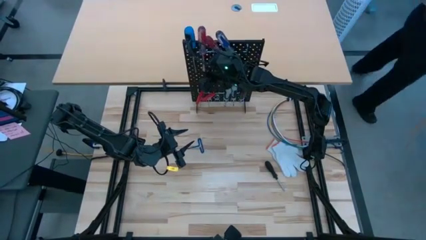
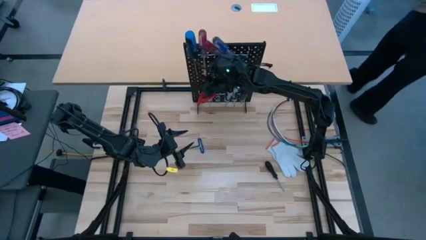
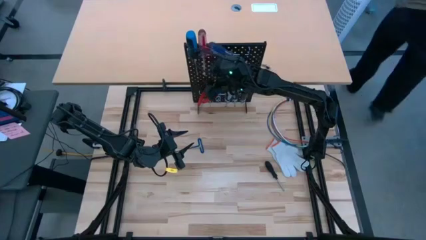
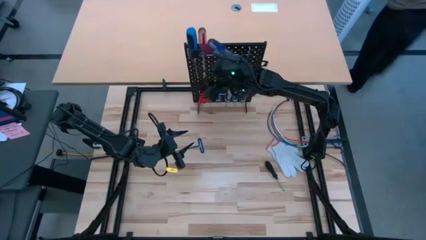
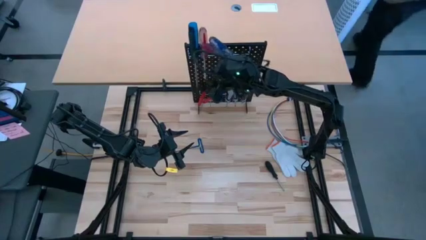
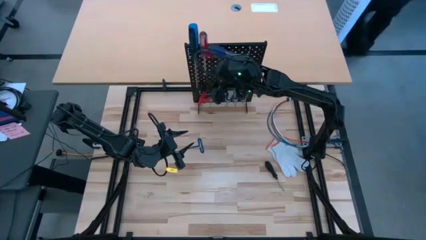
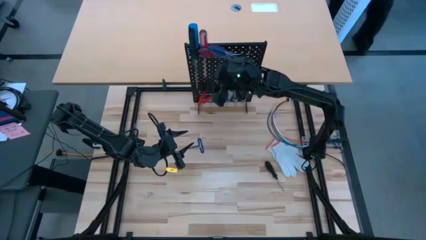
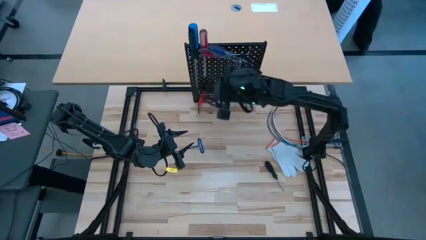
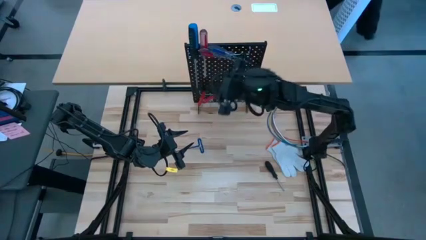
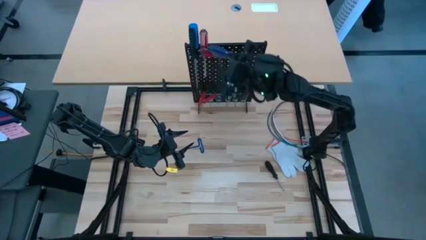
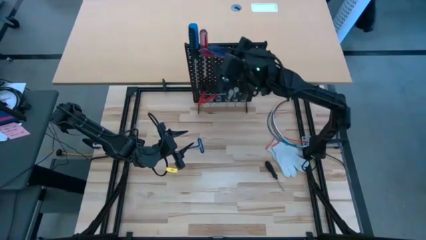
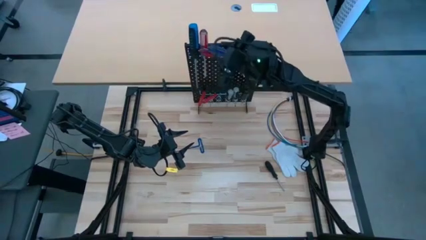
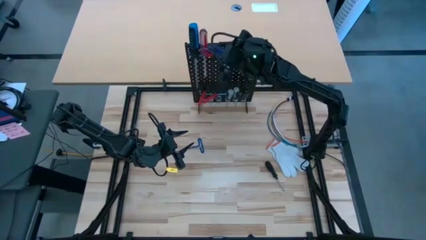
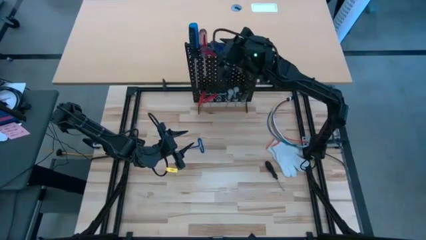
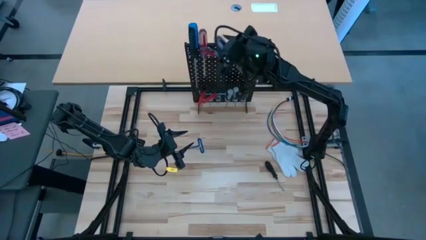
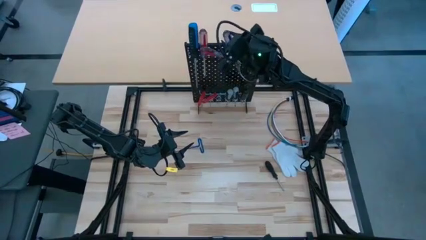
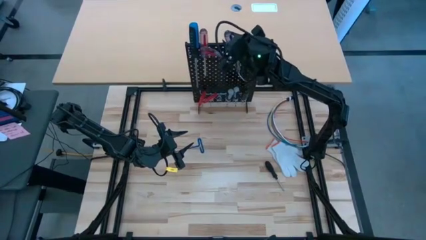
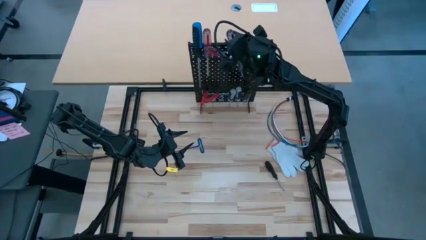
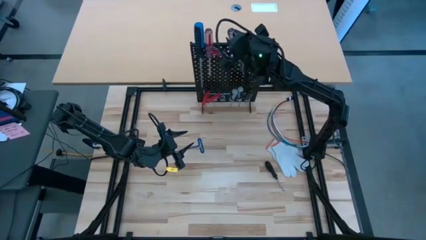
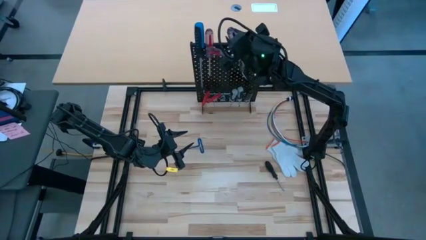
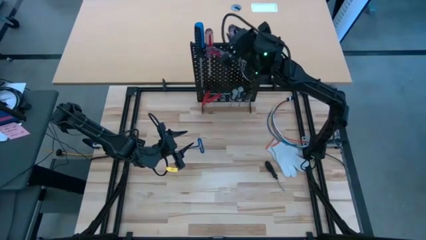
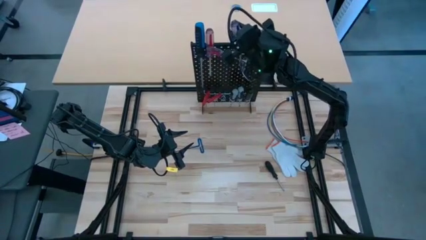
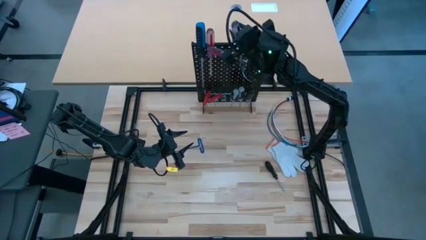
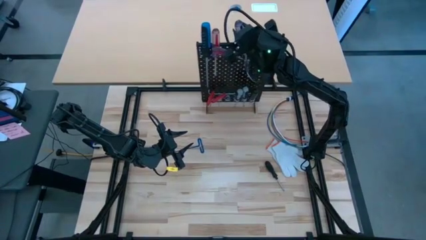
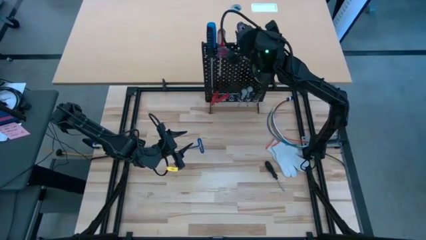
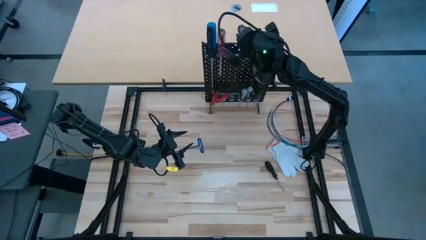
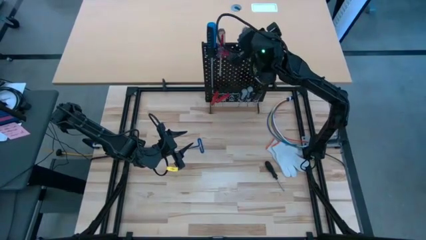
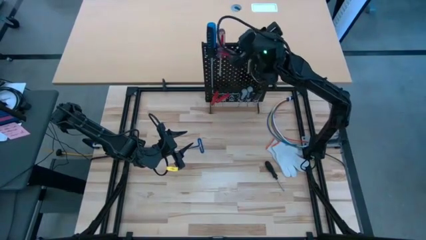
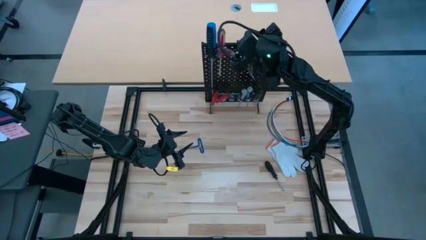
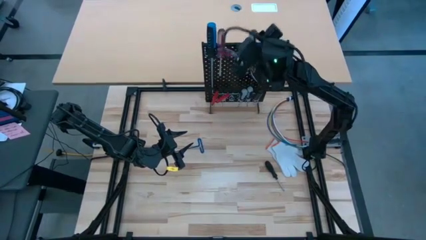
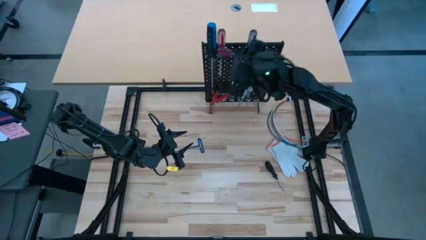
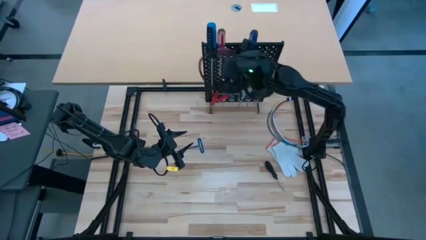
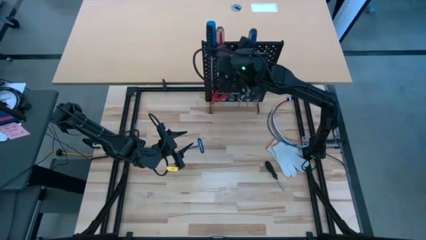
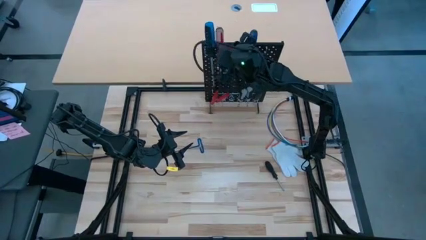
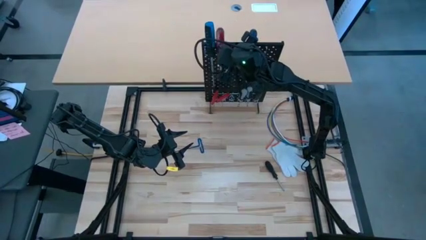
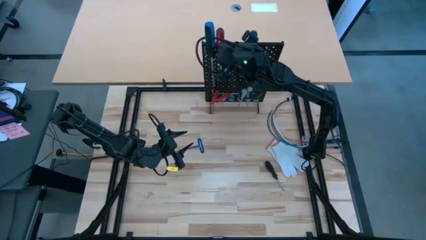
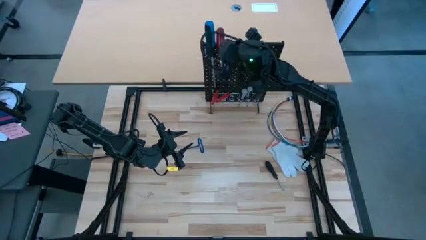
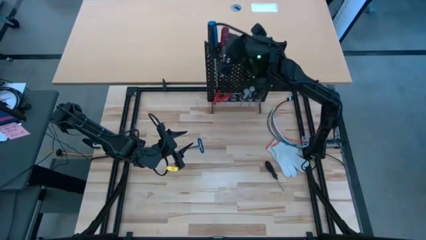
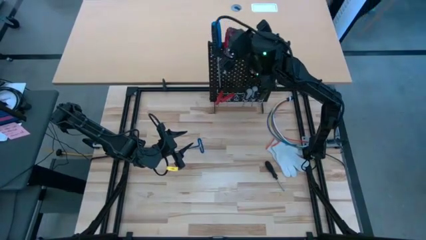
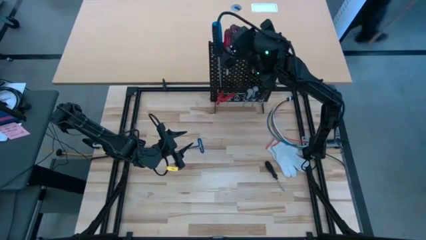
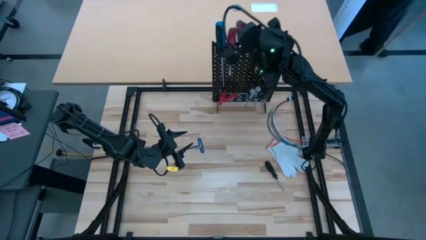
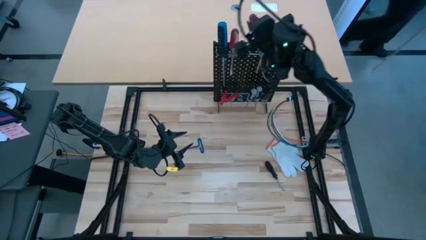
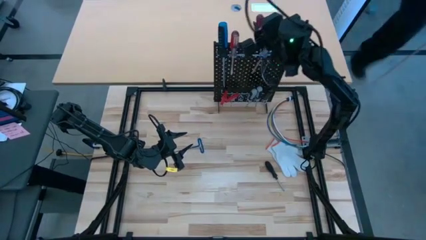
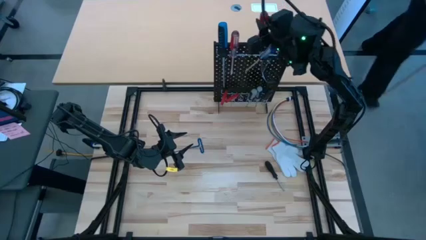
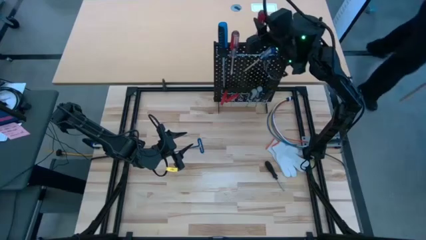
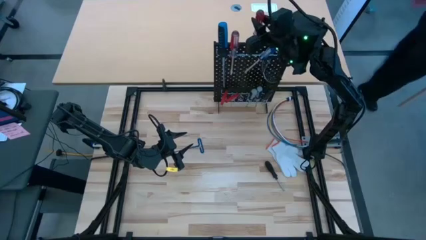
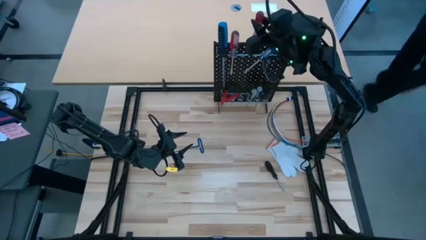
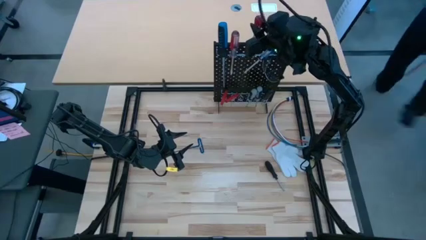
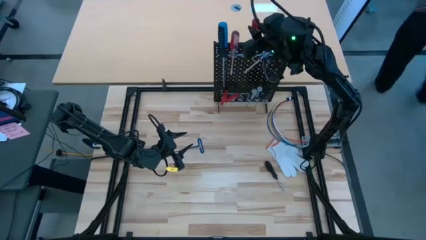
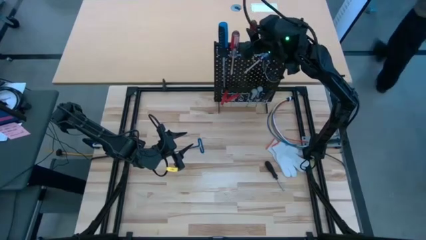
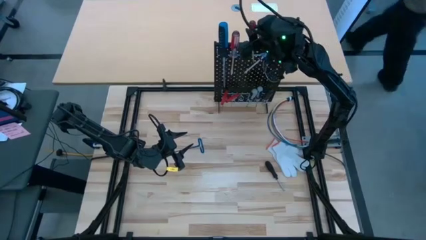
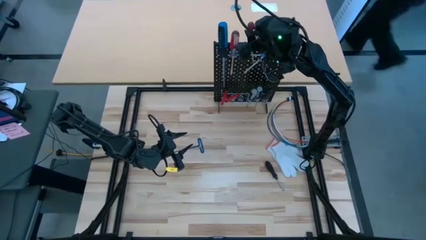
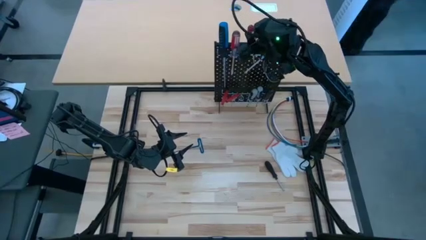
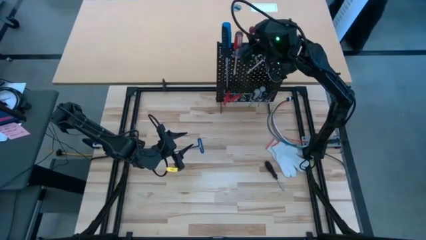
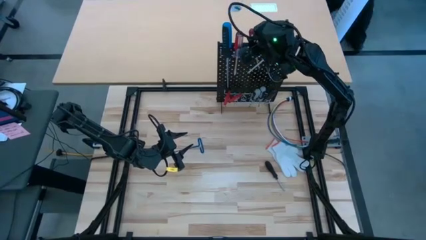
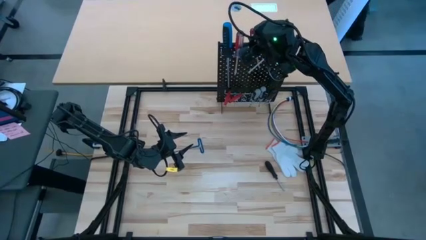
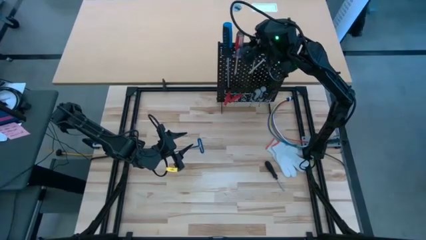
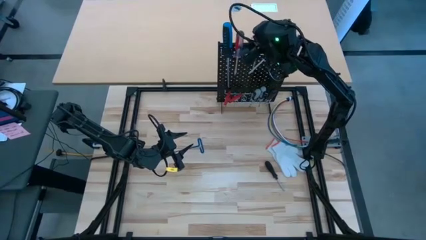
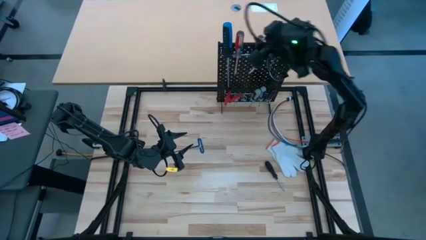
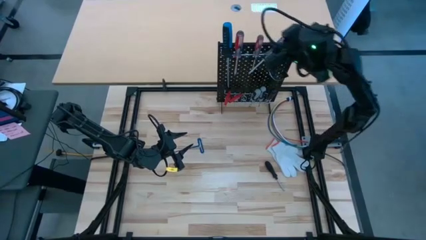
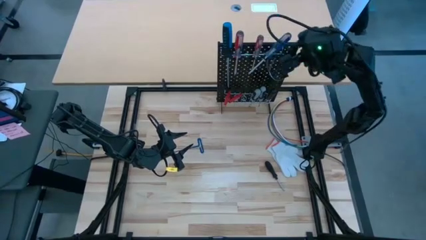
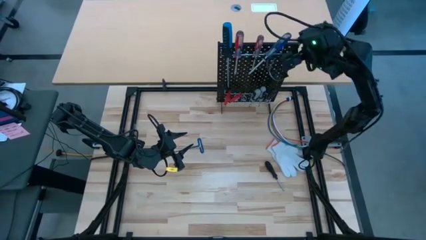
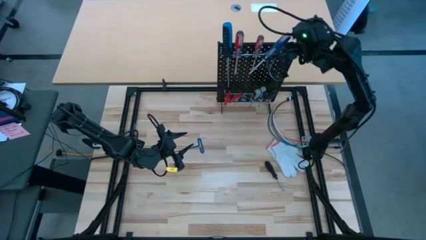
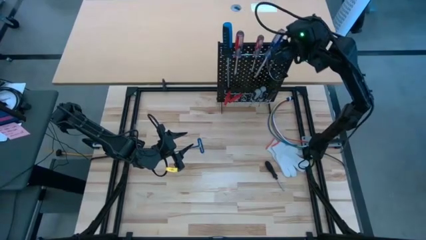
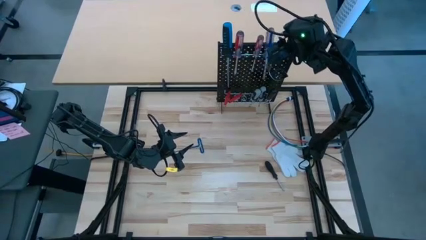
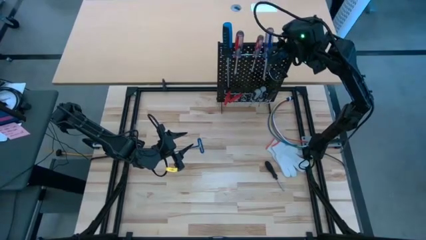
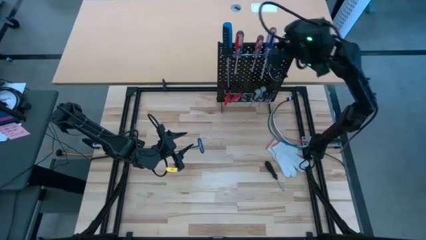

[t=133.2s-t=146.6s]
Task: Hang tools onto peg board
Adjust the transparent screwdrivers on the pegboard
